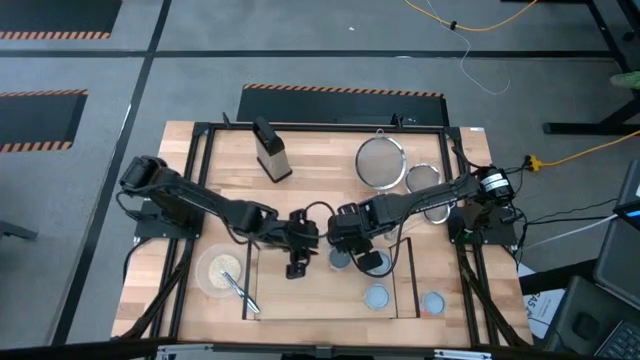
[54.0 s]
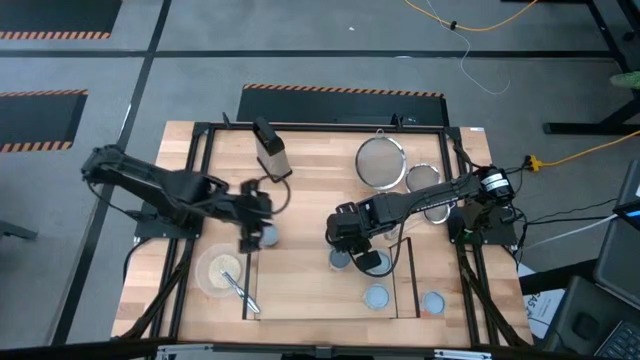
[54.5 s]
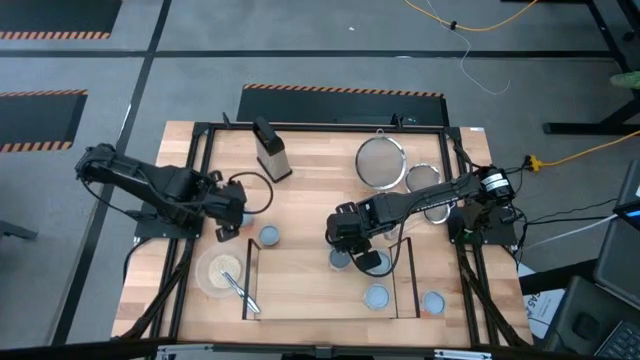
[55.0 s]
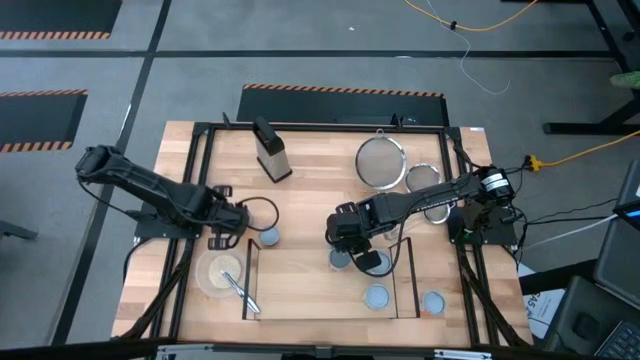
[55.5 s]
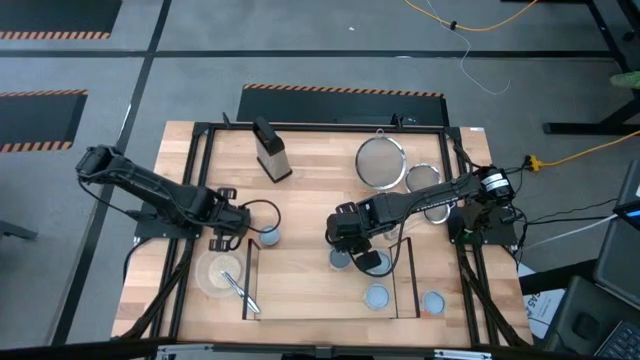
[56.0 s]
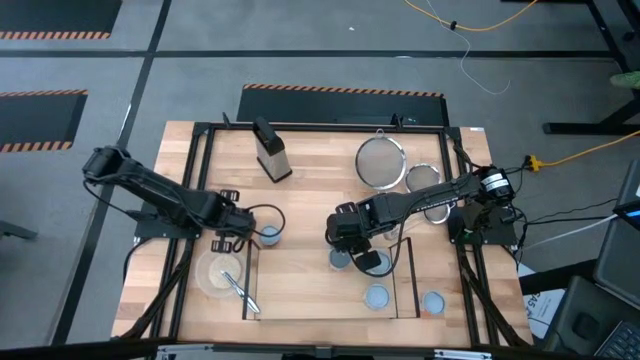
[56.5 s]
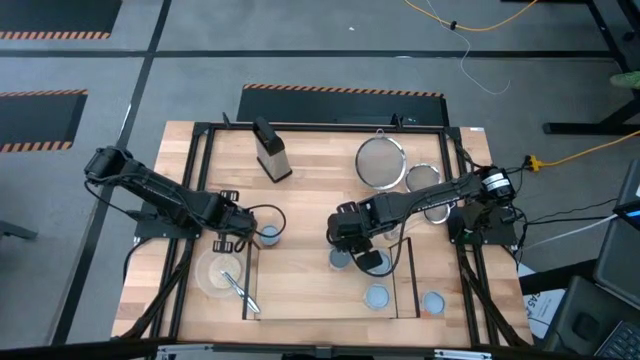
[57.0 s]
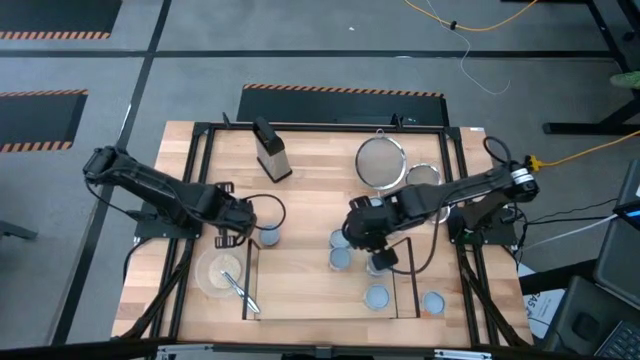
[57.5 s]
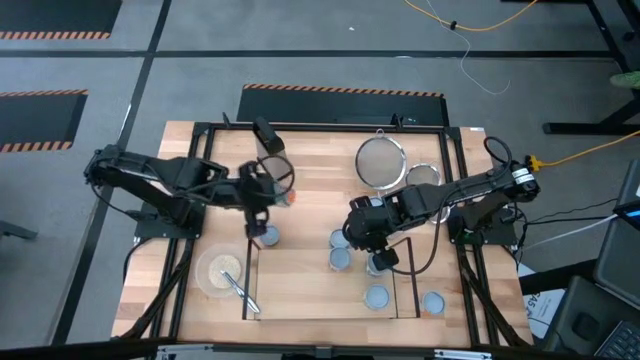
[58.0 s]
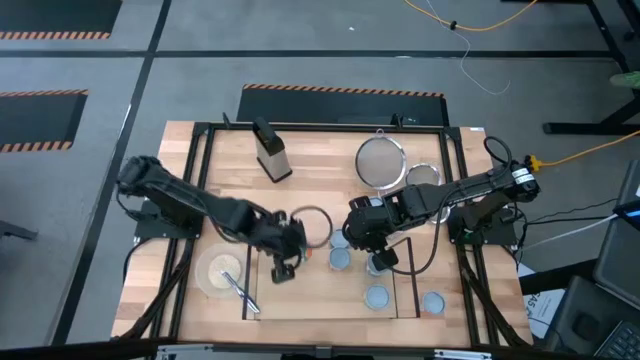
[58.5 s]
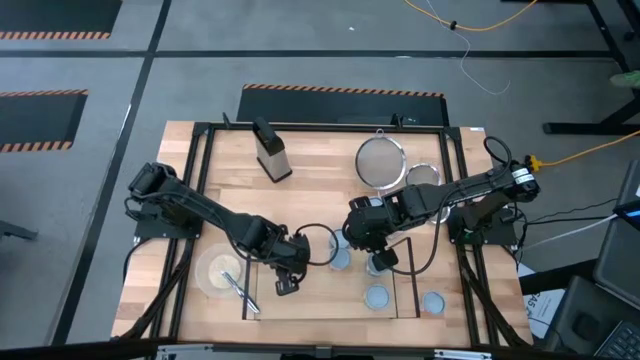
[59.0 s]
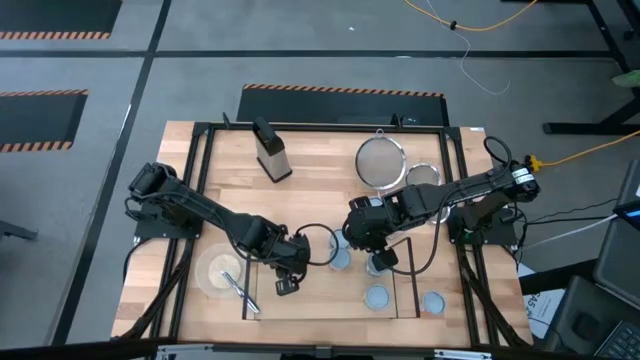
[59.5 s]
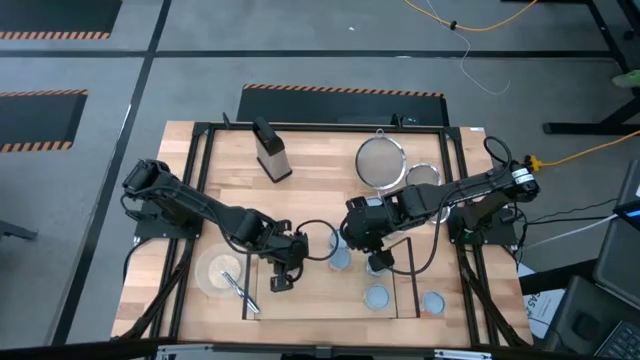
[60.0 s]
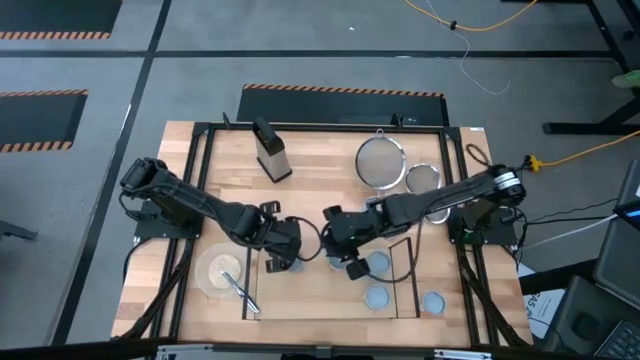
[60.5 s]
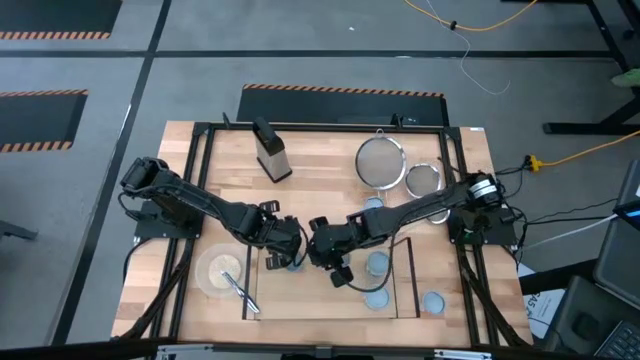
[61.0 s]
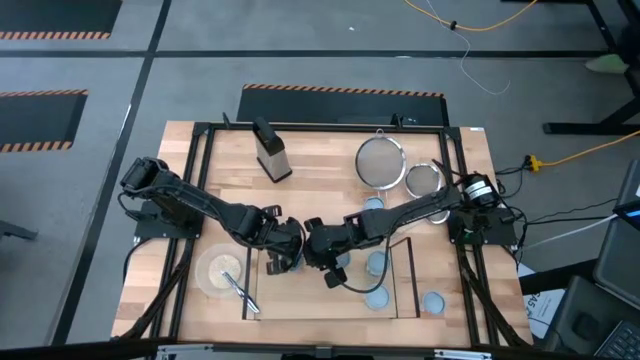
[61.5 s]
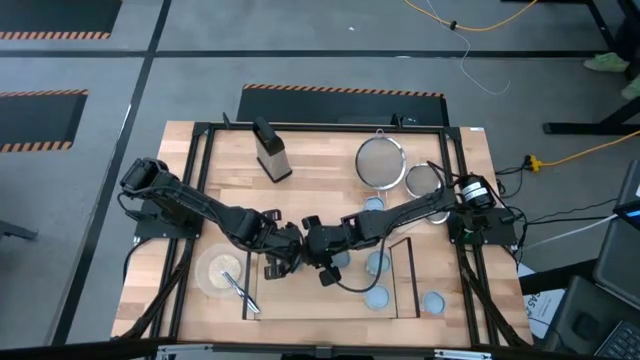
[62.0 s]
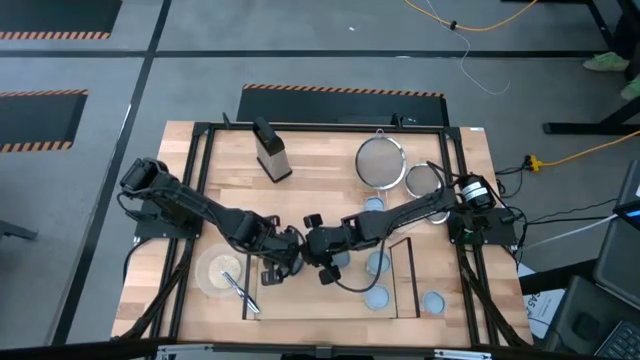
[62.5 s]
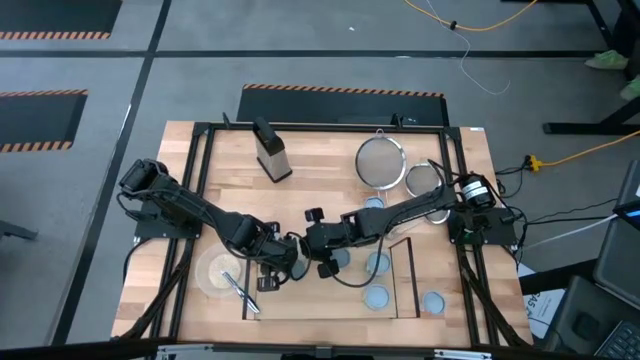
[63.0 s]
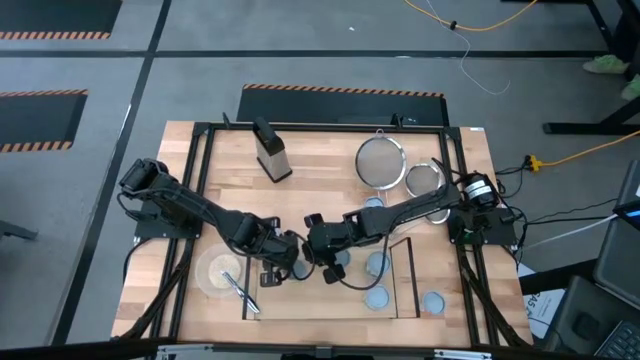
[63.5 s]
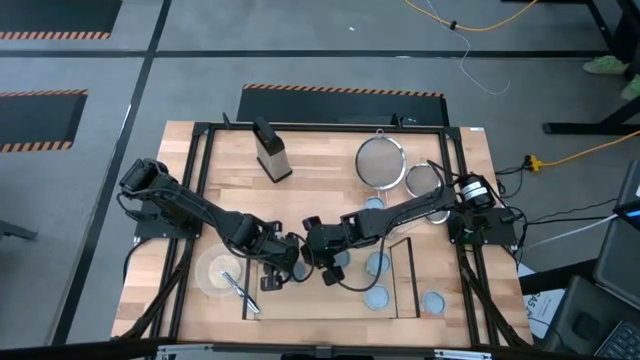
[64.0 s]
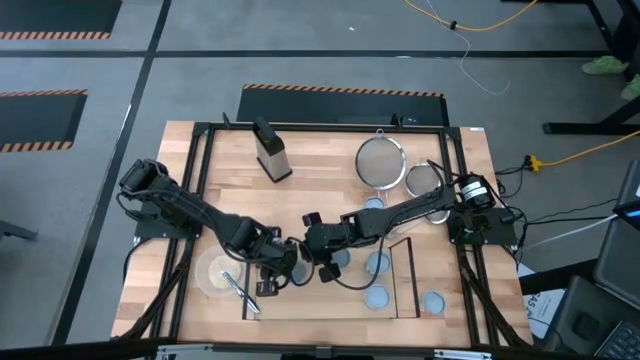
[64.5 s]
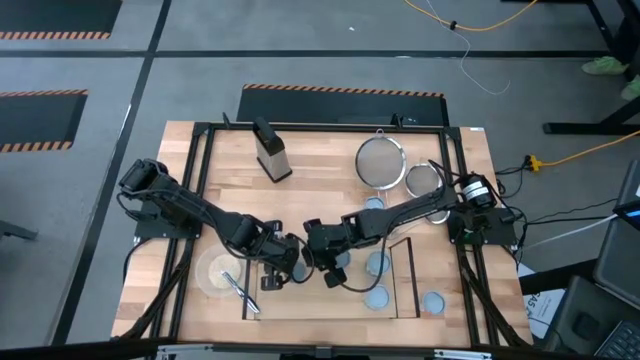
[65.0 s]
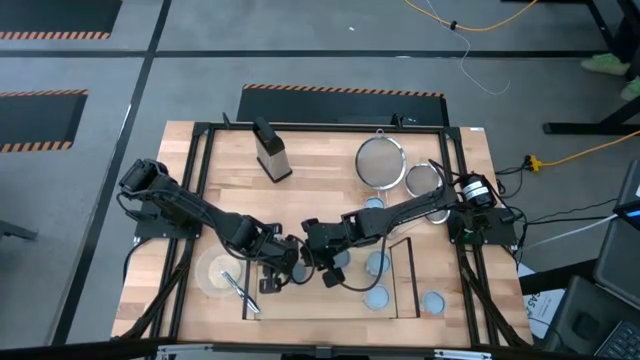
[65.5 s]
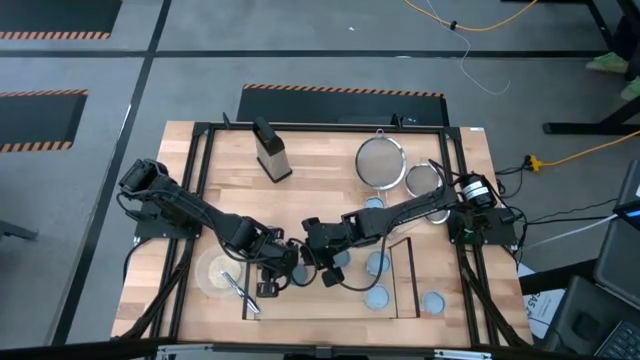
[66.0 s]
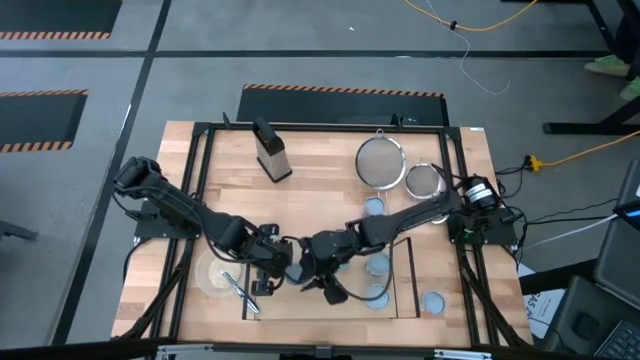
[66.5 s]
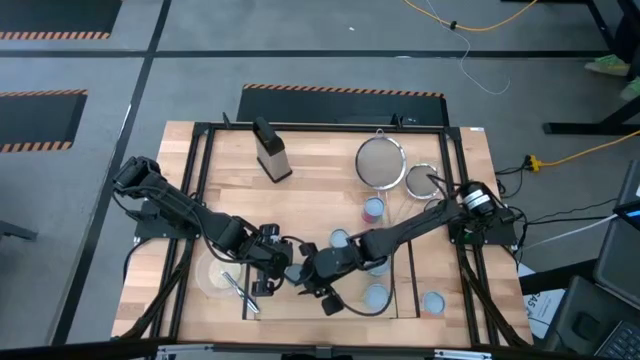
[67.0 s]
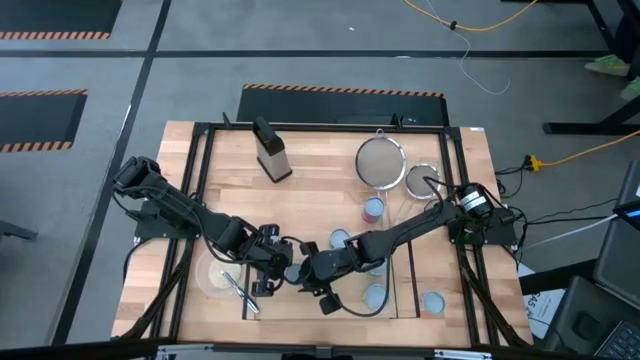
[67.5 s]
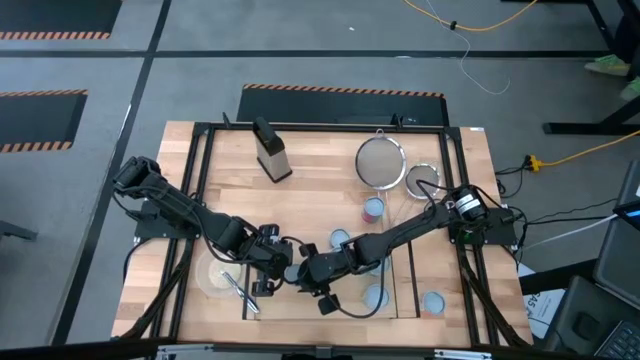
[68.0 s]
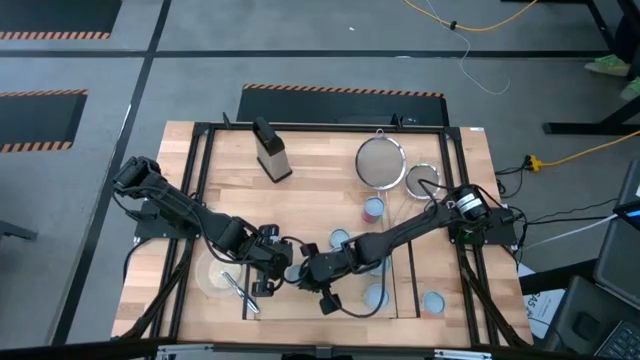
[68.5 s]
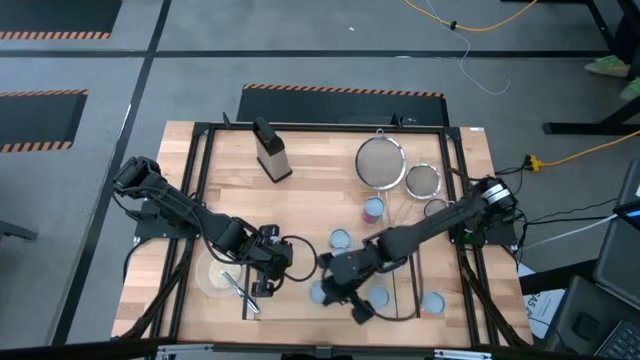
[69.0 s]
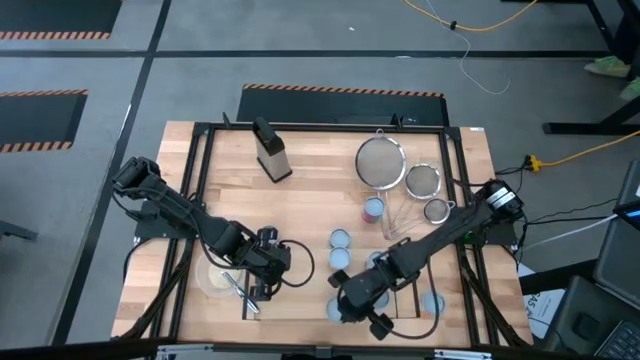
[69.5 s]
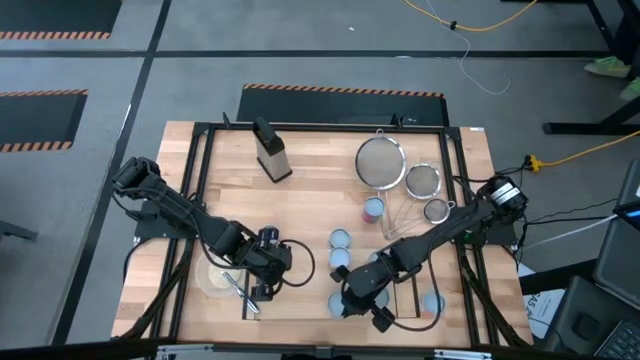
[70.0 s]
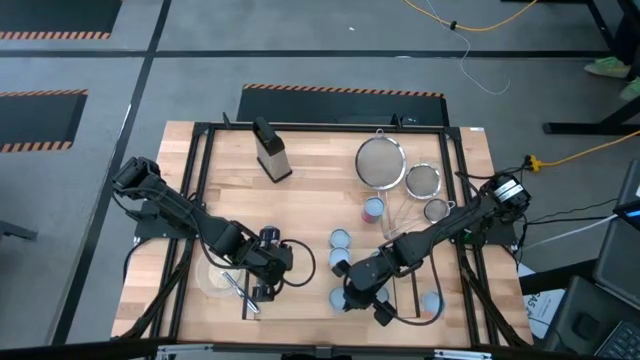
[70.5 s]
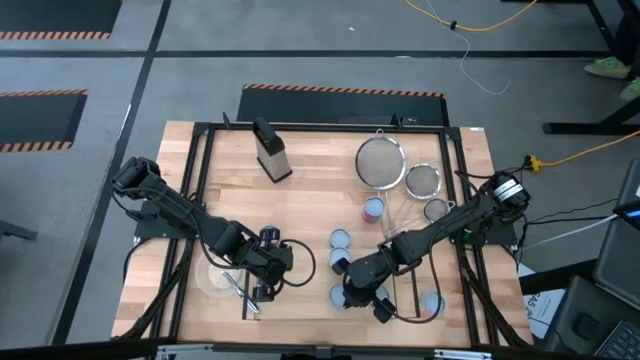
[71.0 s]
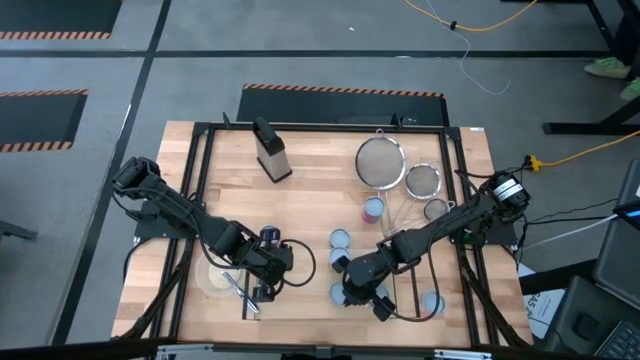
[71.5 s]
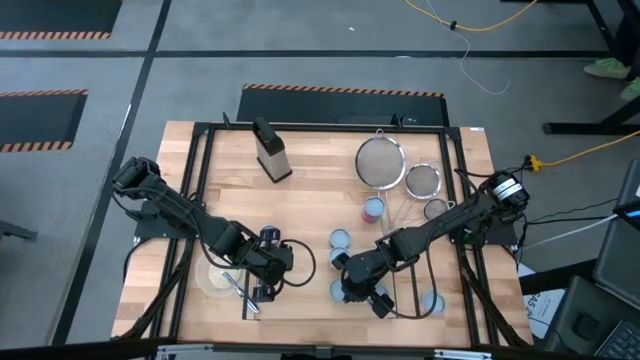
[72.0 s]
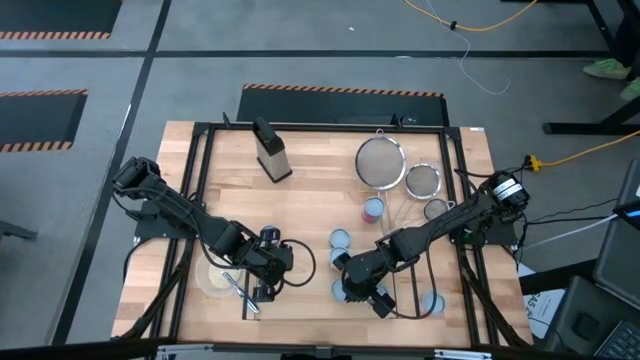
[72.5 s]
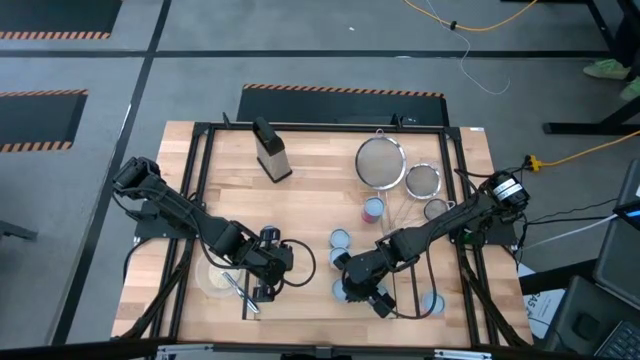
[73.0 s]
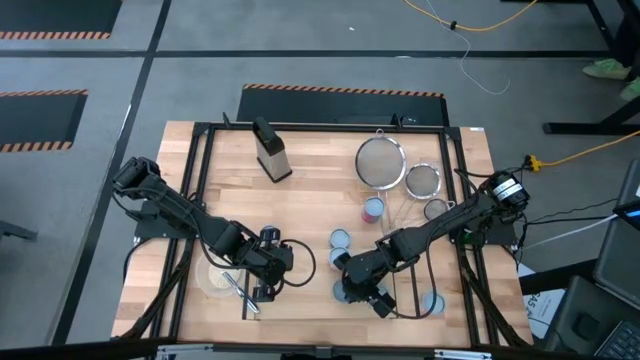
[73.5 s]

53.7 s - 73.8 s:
Task: Pick and place cans onto a shelf
Put the small canned oranges on the shelf

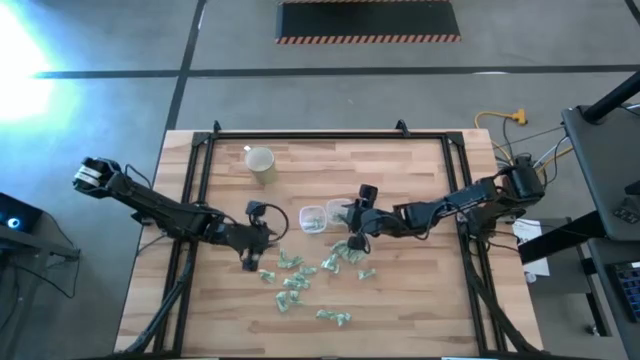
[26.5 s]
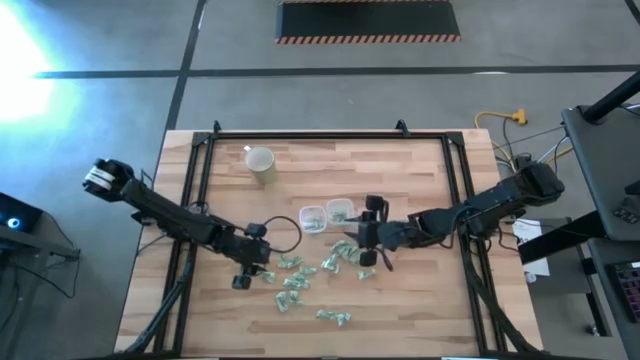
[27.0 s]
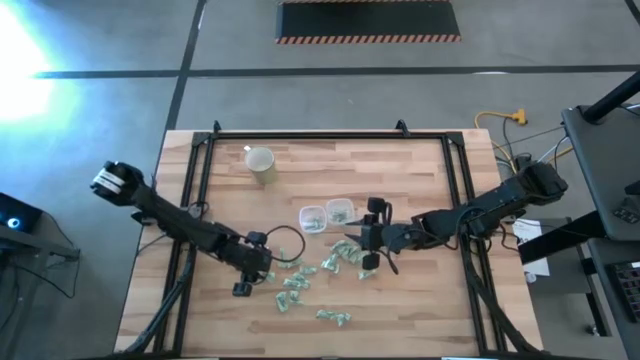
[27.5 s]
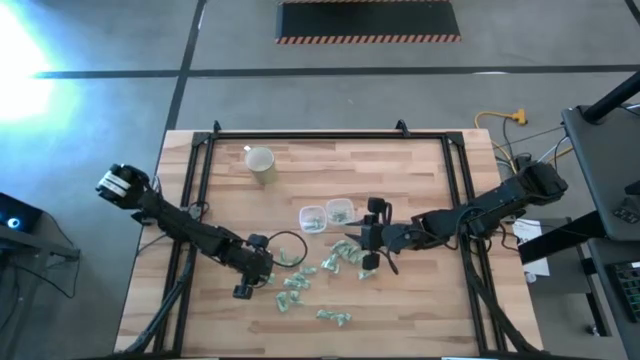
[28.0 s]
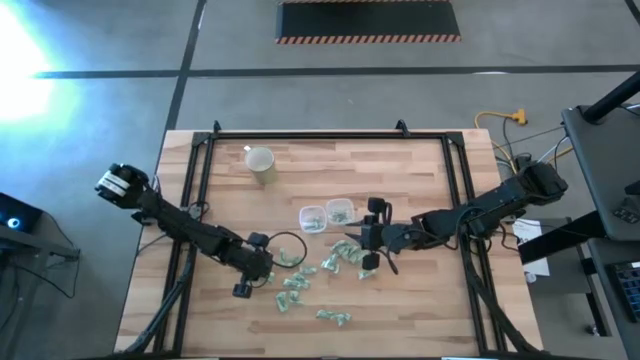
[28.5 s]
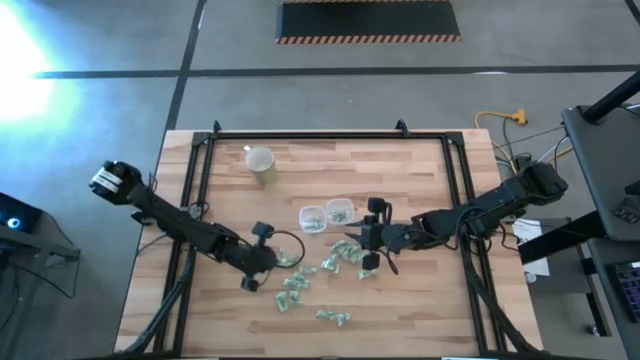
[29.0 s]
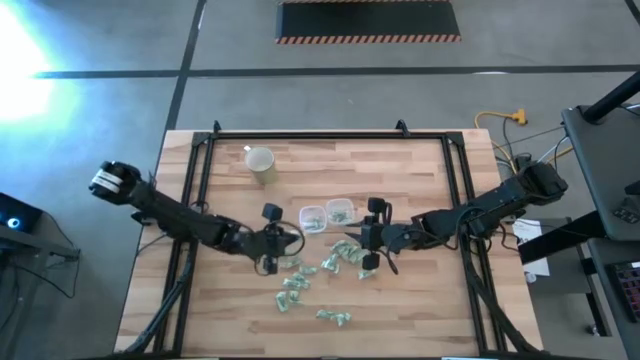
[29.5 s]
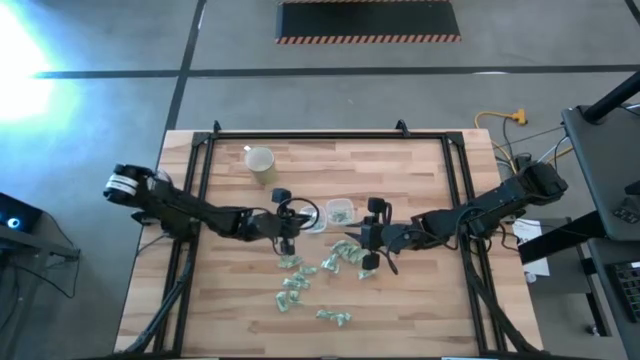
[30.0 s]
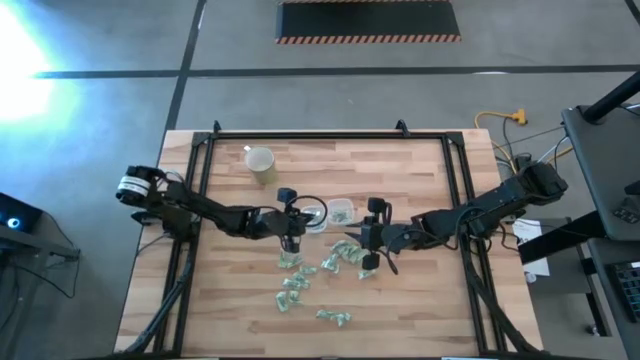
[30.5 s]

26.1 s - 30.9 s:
Task: Pick and place items into bin
Put the stevia packet into the left transparent bin
